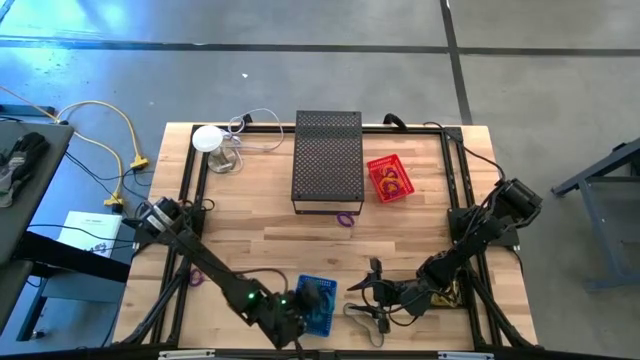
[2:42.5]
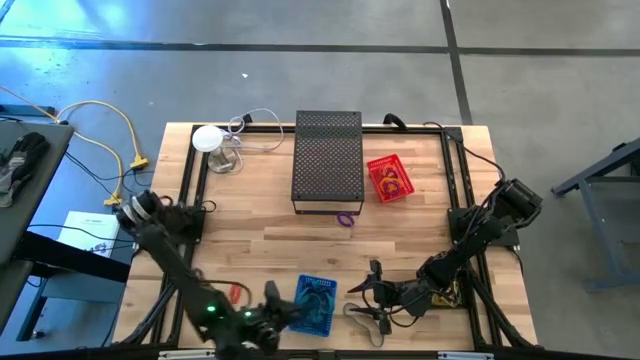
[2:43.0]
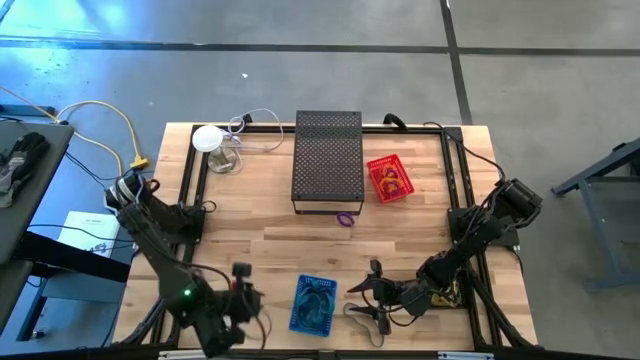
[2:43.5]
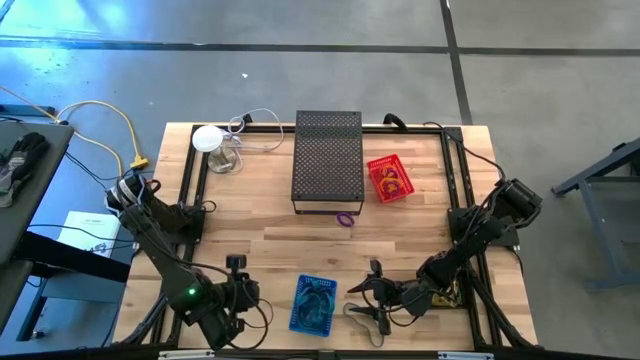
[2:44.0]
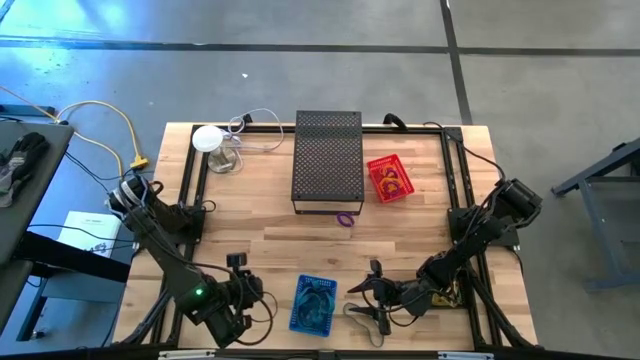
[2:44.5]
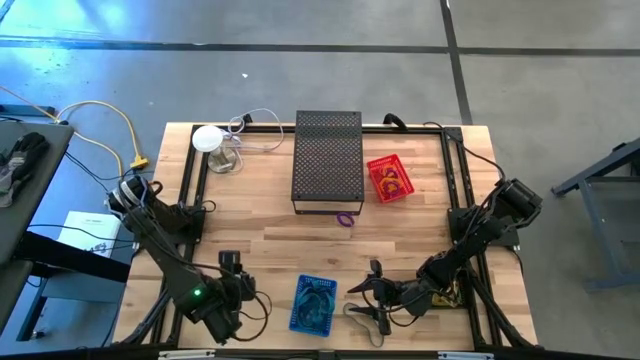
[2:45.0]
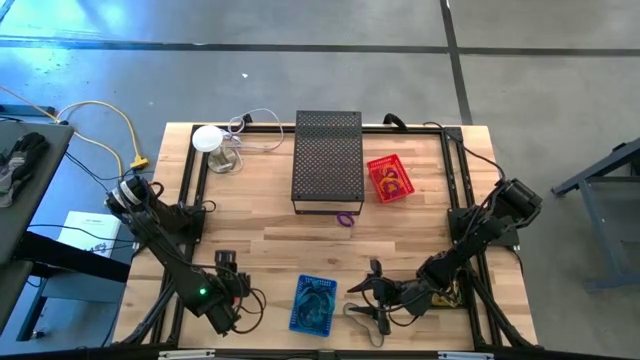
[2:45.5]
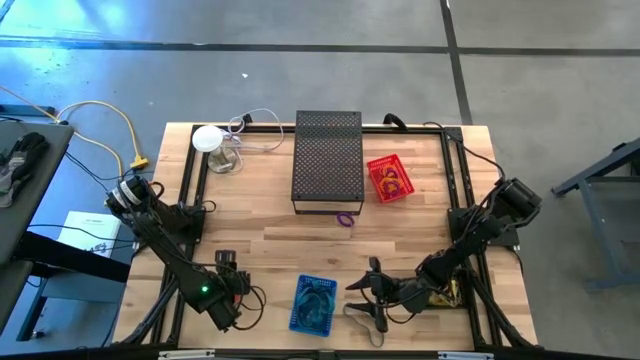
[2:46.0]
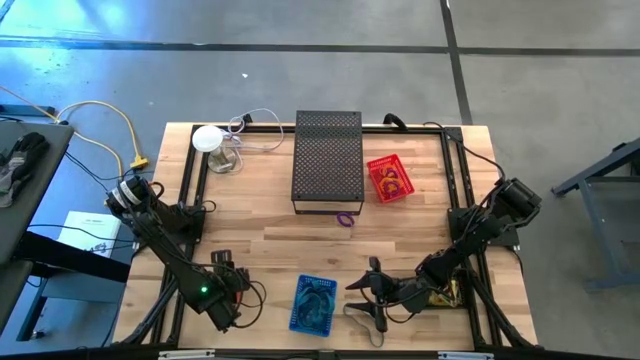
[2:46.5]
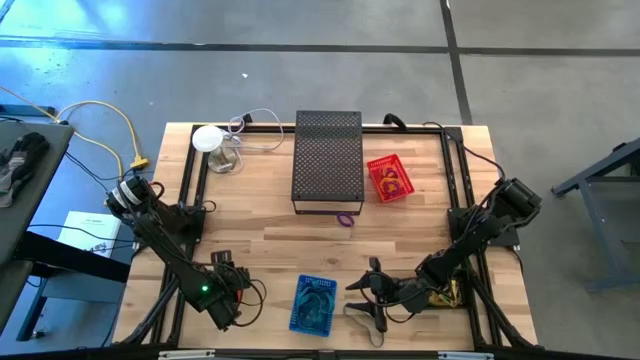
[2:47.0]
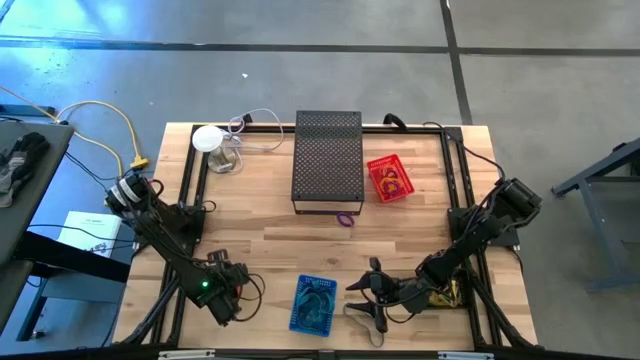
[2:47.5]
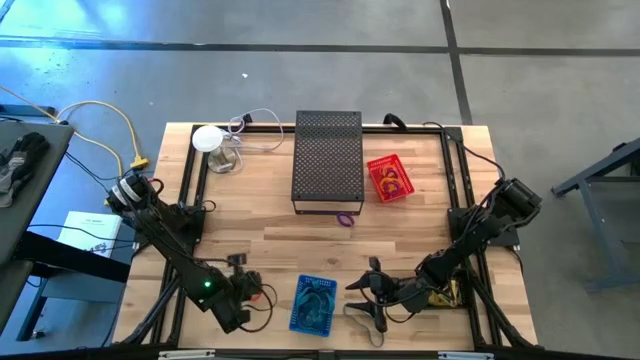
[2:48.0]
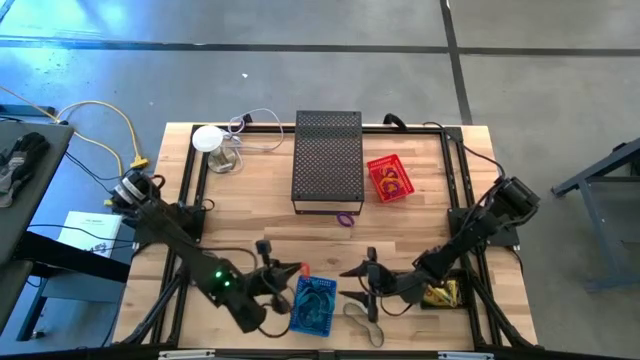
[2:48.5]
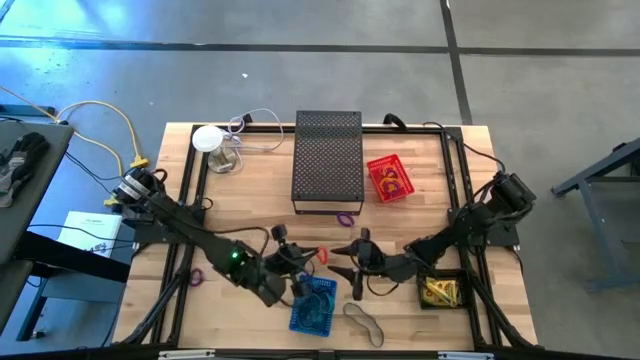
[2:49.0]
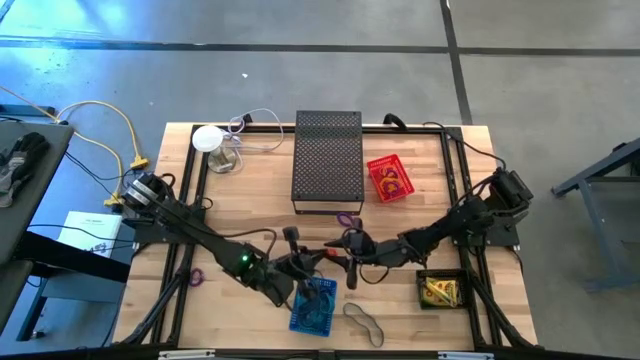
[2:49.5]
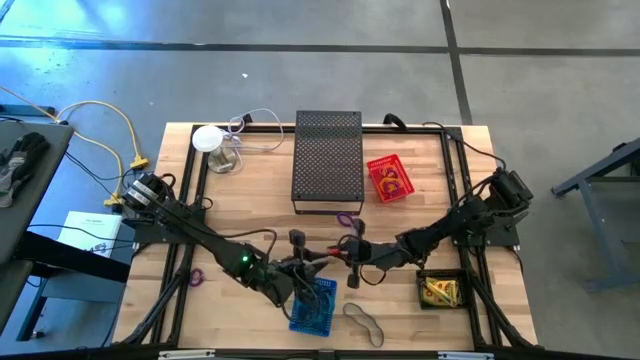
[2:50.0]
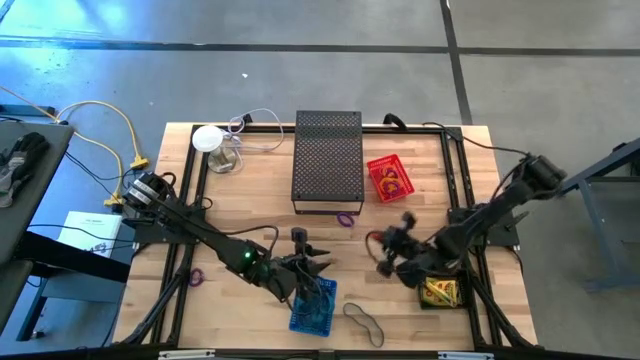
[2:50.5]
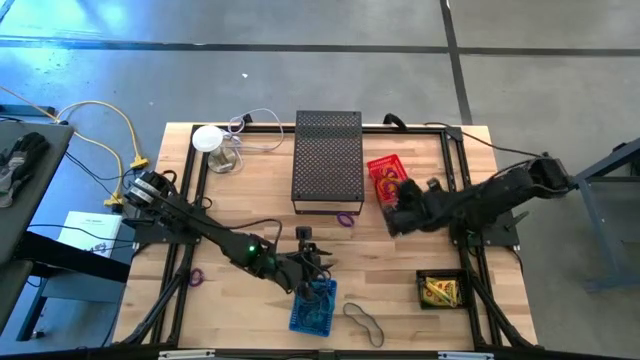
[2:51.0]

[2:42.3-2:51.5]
Task: Pick & Place Office Desk Supplies
Put the orange spring keychain into the red bin

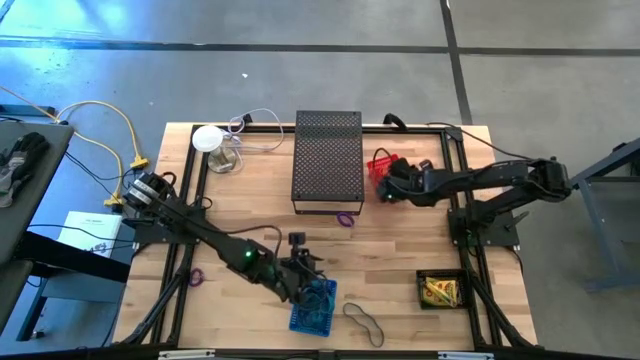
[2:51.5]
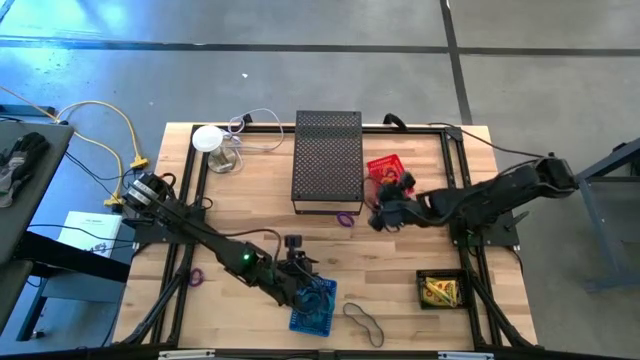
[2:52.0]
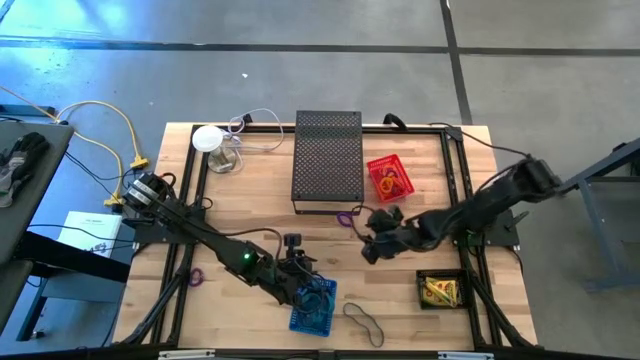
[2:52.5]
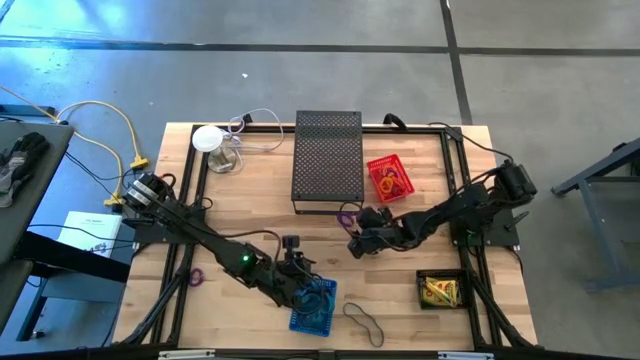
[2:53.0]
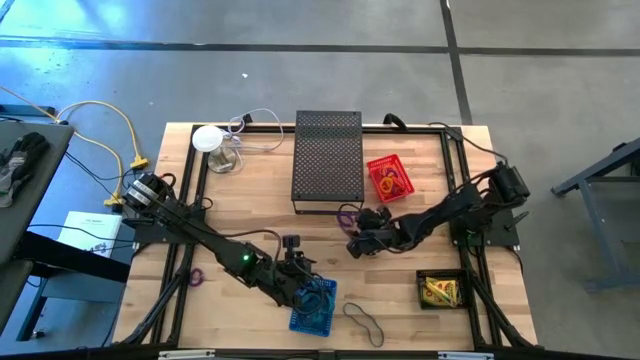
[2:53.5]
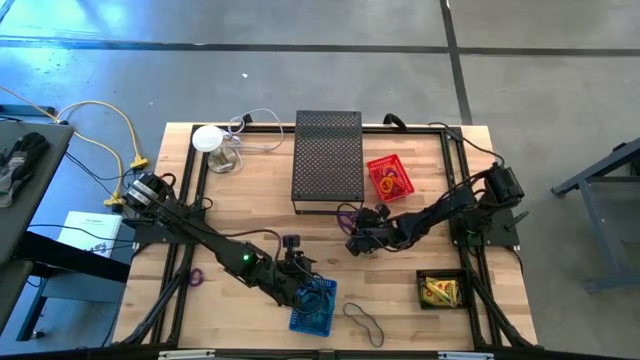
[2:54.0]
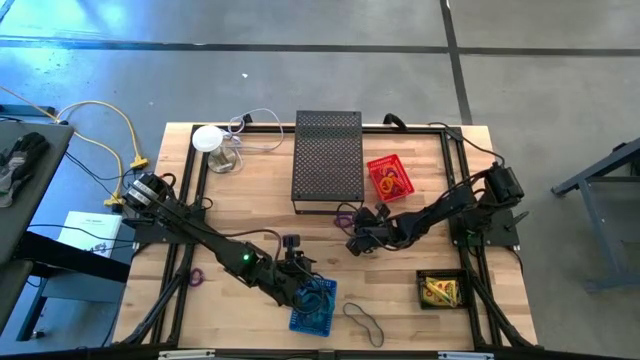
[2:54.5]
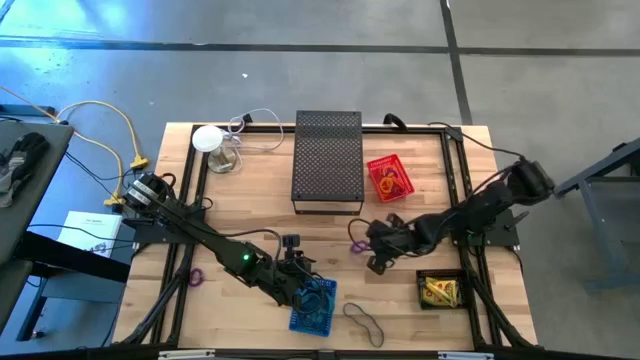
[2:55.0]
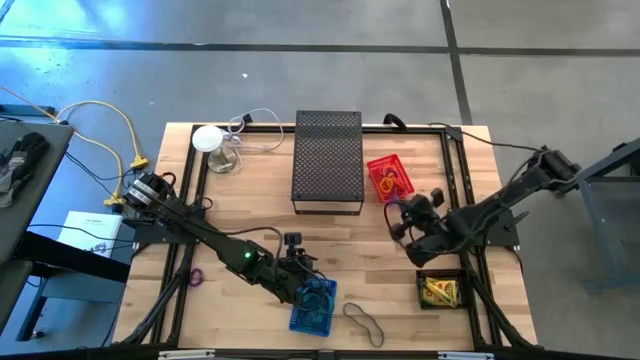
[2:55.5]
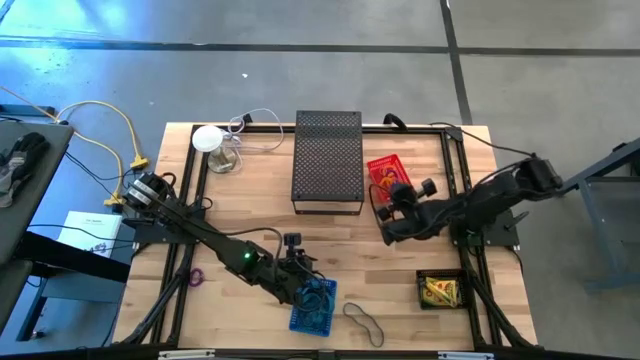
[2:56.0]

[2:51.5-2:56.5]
Put the violet spring keychain into the red bin

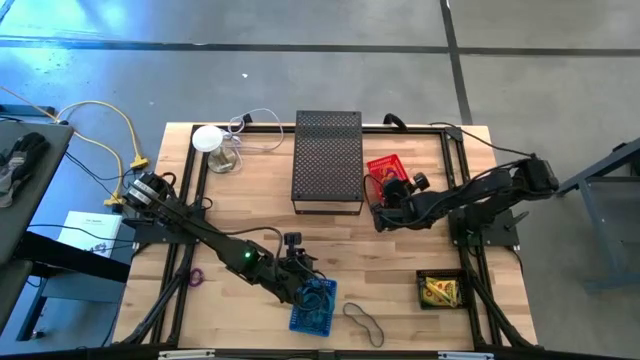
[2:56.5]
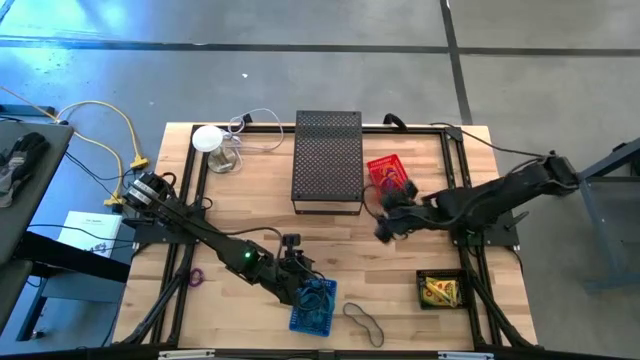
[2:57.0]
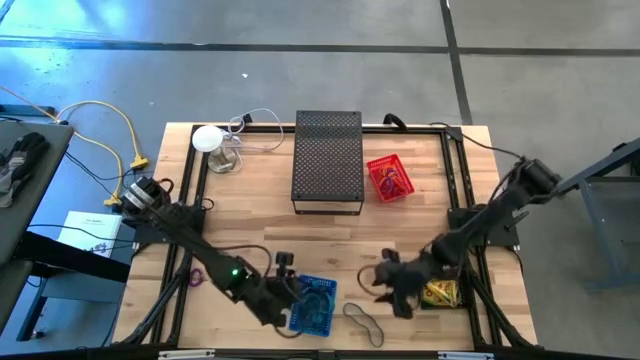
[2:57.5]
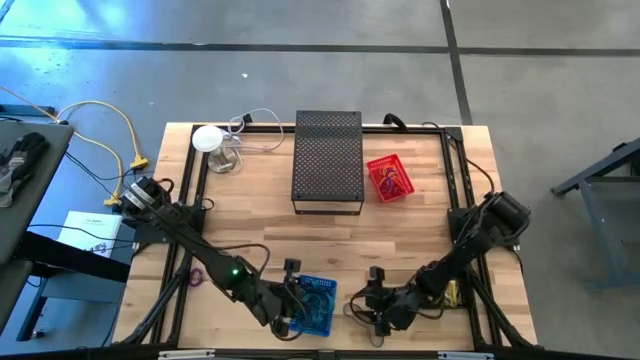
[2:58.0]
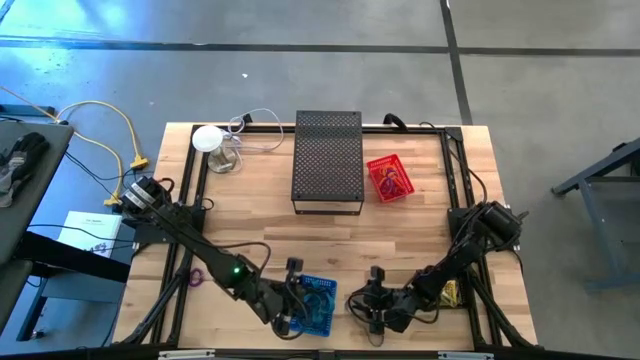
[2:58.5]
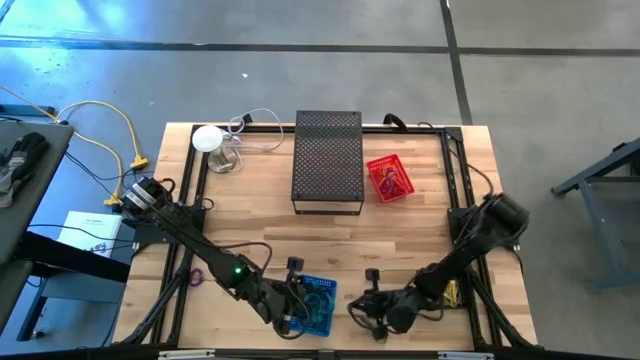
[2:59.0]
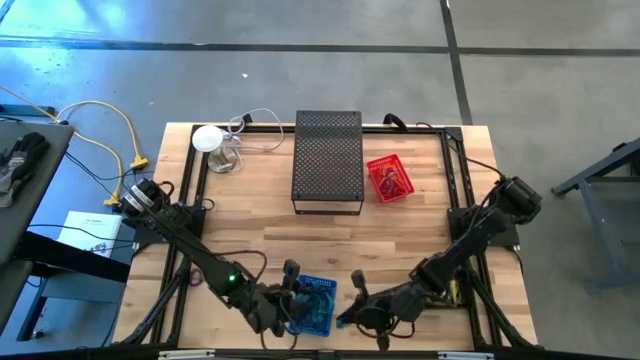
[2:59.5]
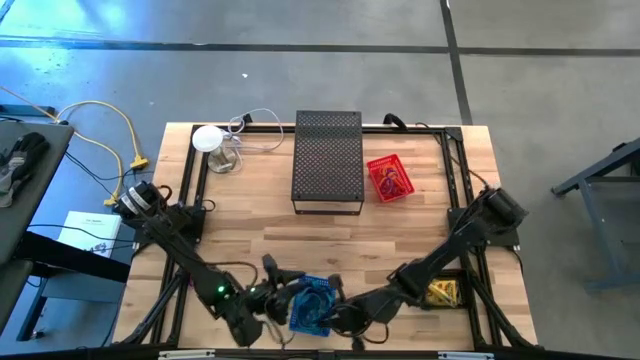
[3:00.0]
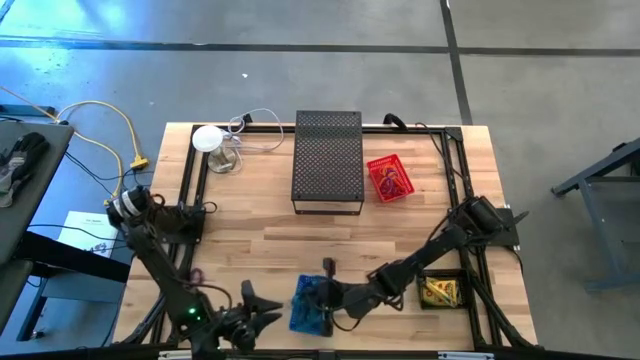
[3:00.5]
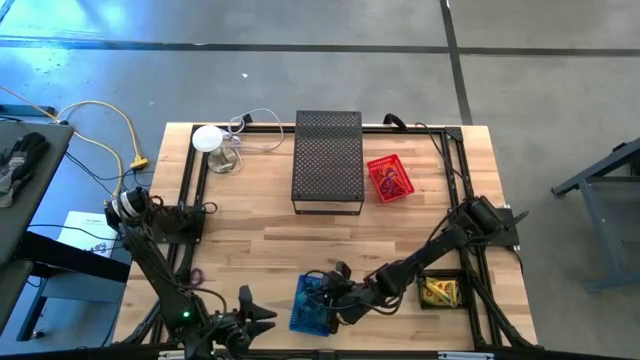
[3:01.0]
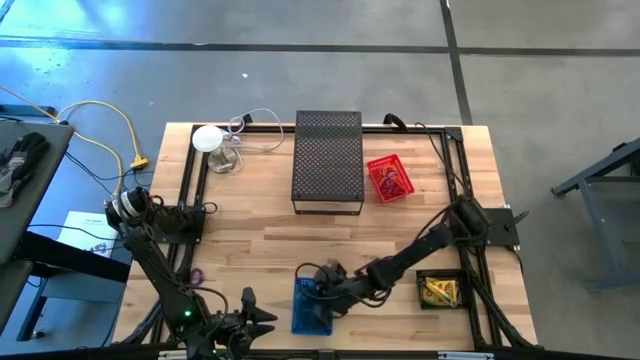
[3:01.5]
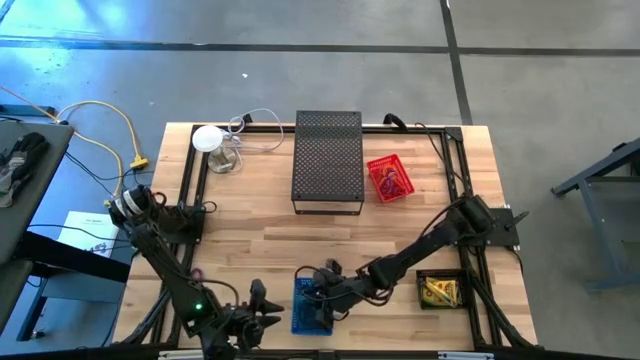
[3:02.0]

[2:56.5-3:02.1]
Put the blue spring keychain into the blue bin

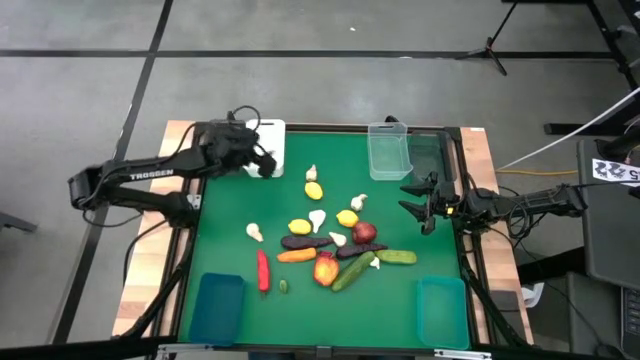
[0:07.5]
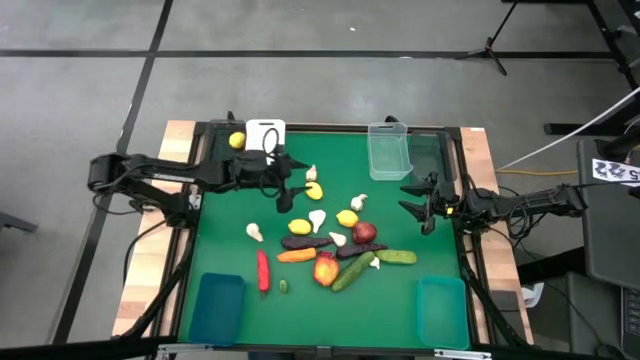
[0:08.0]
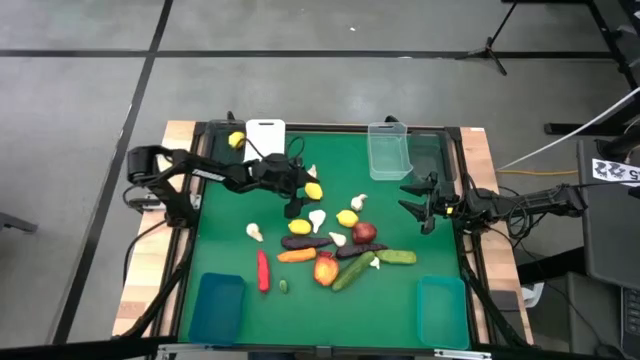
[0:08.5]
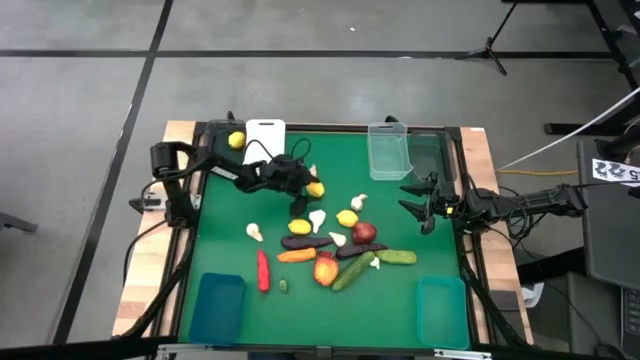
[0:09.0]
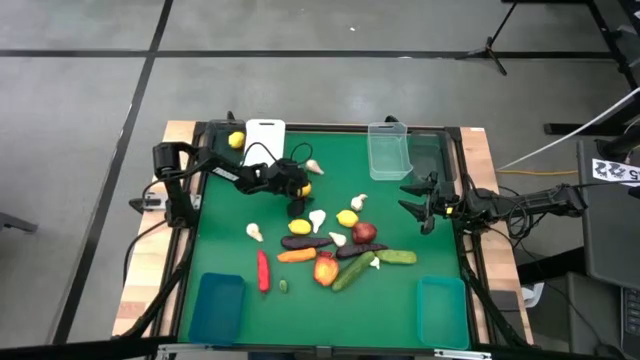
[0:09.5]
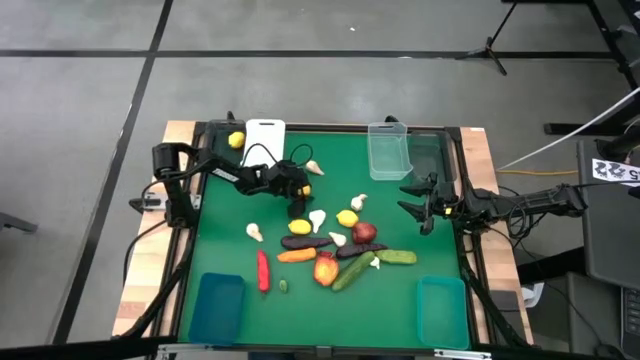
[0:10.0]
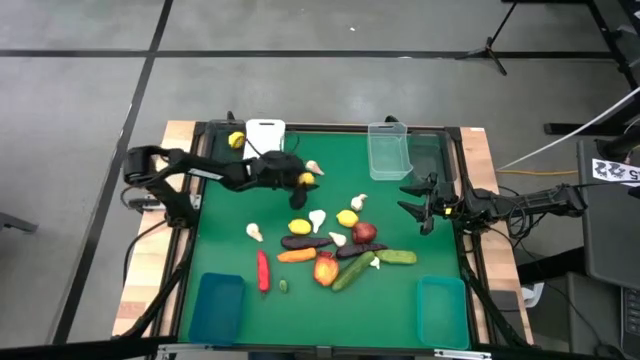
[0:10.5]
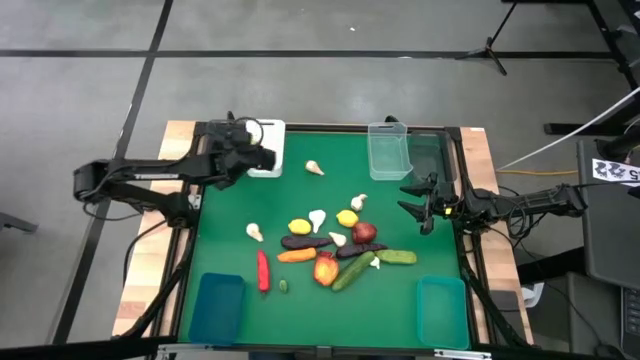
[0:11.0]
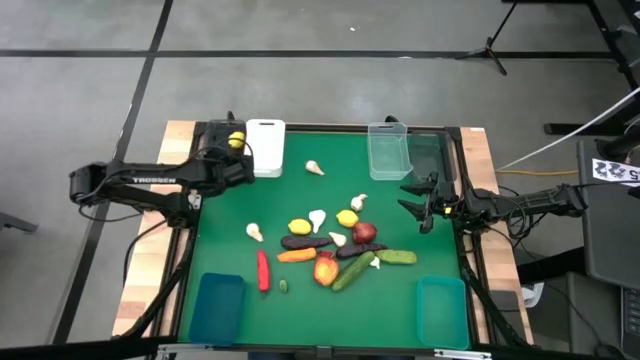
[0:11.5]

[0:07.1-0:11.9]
Task: Sort produce into baskets
Put the lemon into the left black bin
